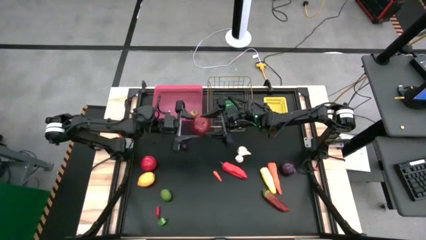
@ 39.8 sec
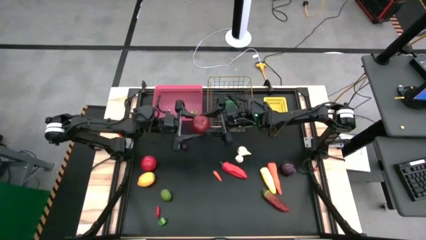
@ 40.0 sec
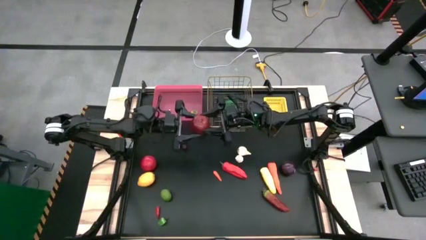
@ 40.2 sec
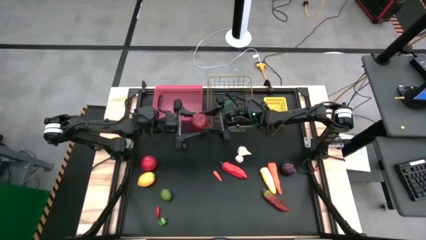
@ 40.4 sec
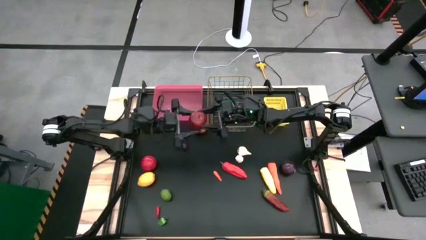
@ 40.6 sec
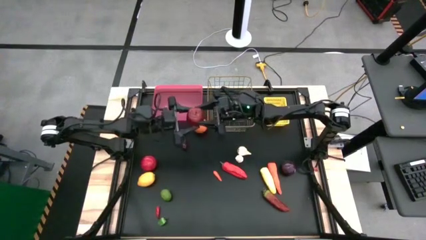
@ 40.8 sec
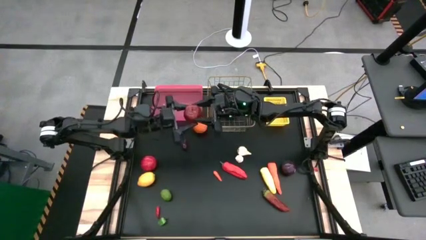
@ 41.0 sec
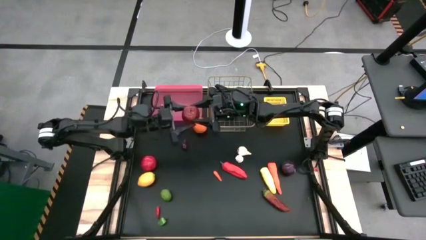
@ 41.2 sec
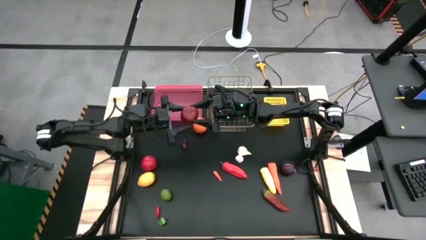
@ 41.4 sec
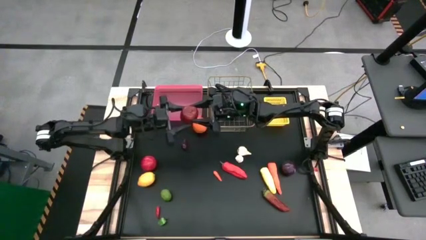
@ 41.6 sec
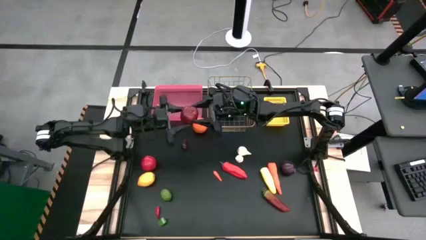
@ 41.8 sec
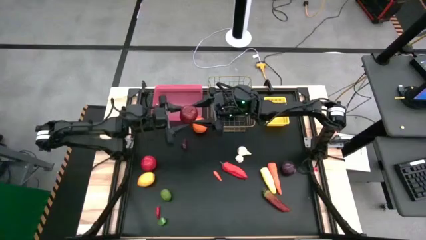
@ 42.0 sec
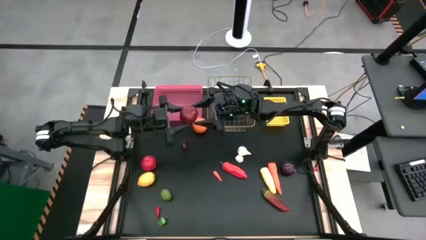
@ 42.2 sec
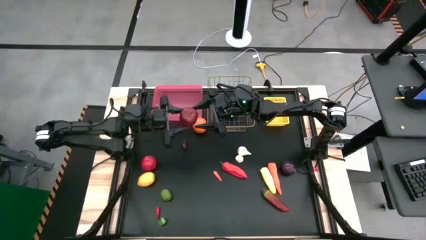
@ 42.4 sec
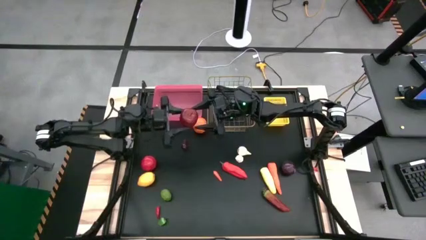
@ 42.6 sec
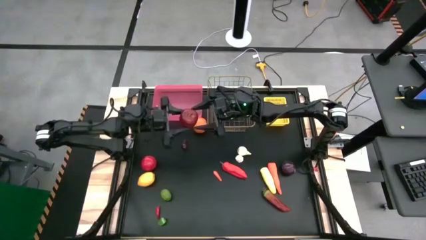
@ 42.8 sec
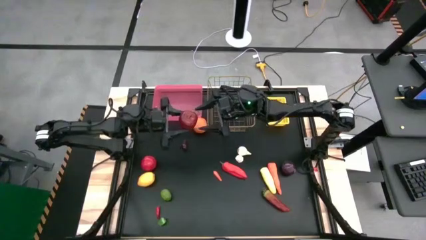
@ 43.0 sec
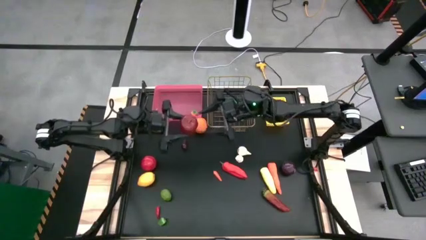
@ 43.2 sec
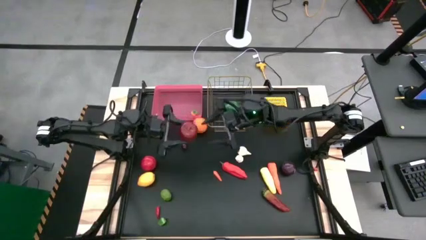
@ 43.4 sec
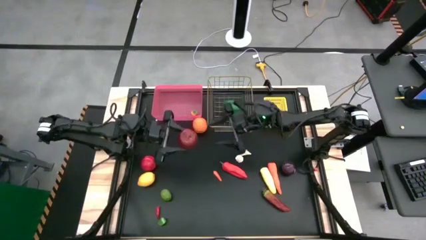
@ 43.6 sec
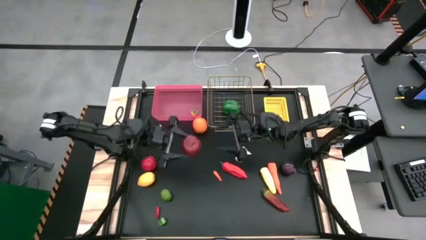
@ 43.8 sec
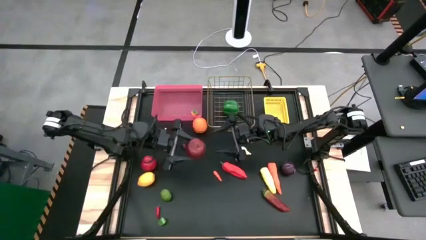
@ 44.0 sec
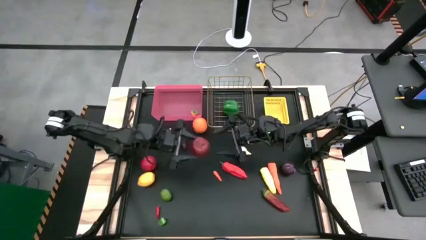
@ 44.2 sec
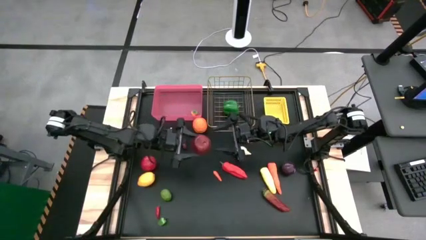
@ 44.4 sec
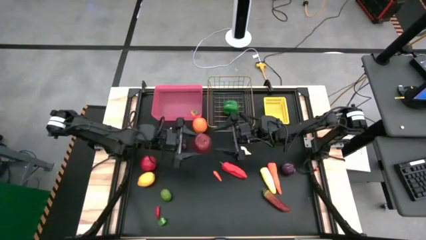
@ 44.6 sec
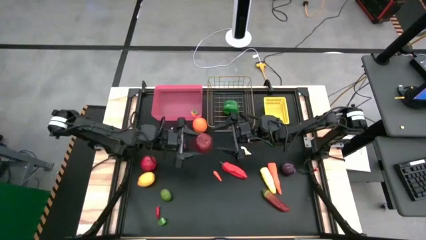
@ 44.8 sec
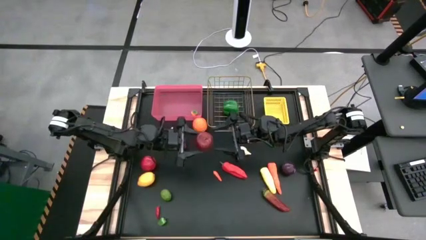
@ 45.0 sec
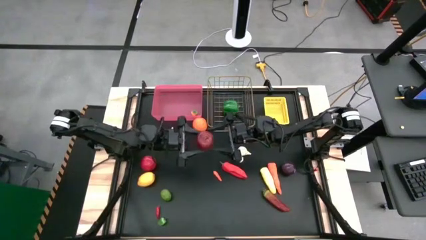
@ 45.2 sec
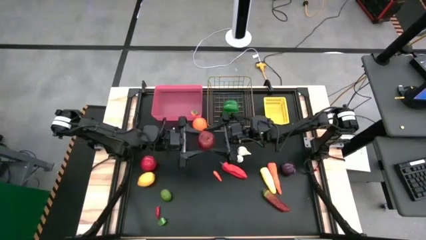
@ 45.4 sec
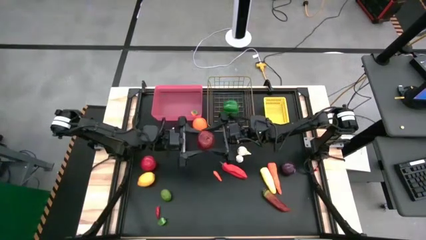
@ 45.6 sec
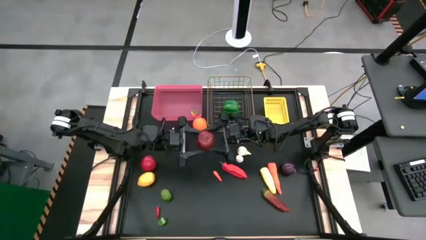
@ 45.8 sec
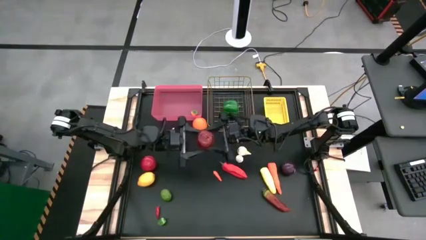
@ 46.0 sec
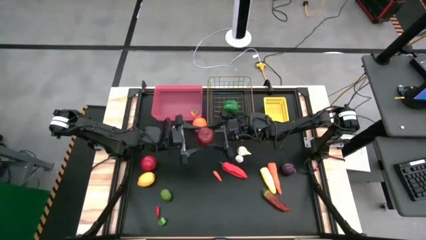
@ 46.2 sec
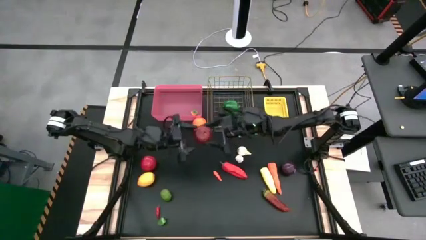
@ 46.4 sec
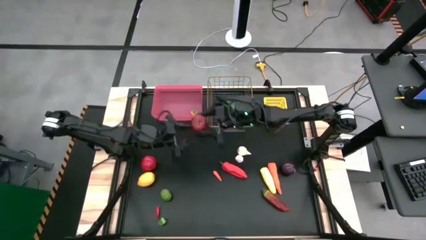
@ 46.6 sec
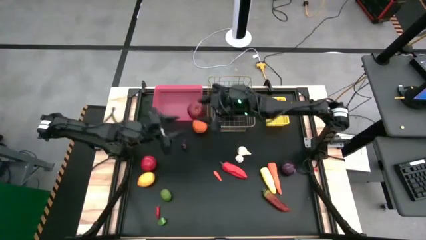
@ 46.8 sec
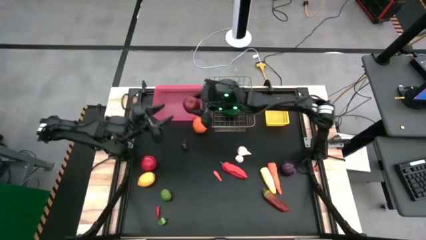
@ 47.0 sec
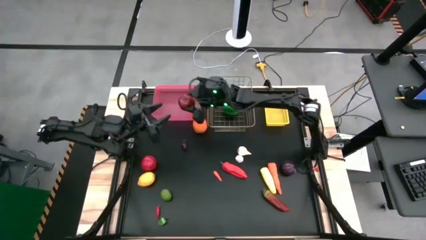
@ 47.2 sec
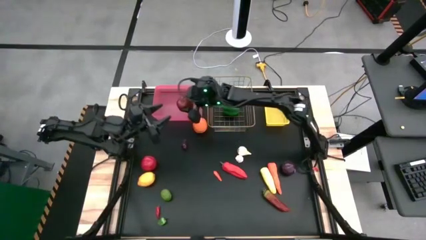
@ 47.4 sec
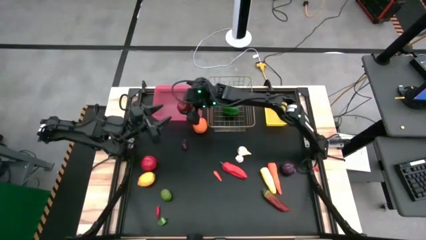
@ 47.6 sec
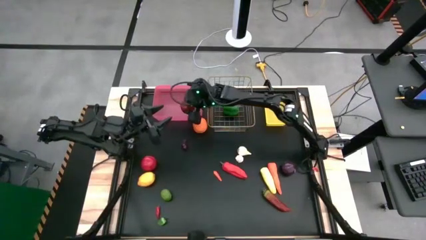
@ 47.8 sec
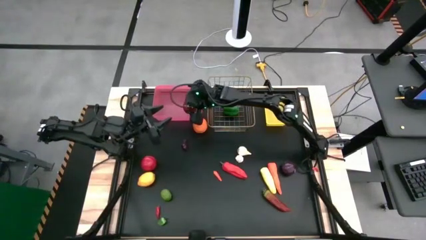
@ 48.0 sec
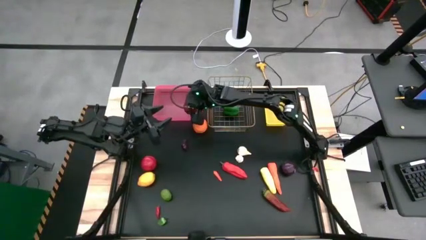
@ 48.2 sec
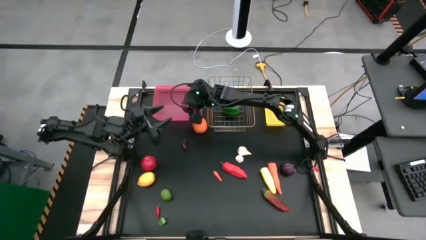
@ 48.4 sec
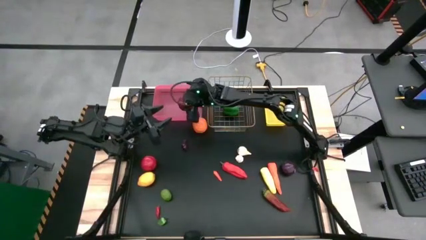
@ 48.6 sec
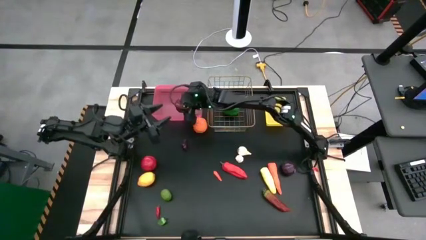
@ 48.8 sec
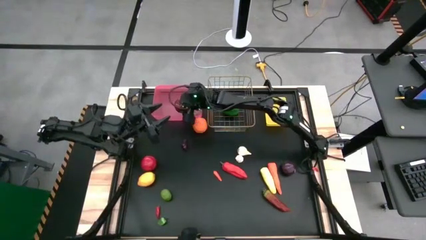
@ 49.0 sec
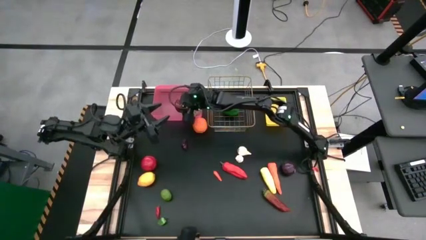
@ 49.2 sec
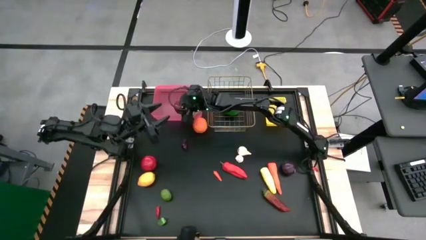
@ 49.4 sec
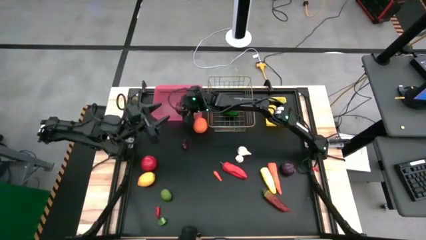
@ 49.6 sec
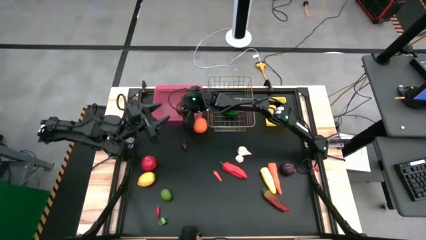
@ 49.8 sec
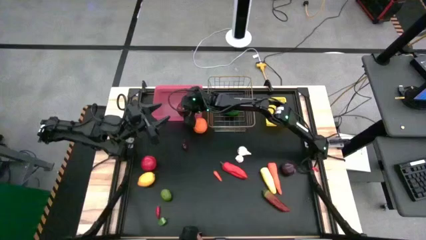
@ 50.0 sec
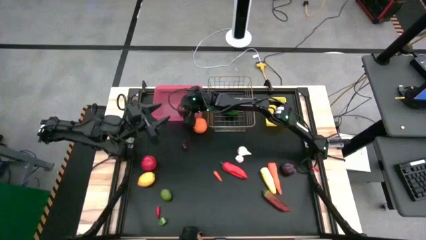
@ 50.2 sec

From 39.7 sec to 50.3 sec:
Task: Sort produce into baskets
Put the red apple into the red bin

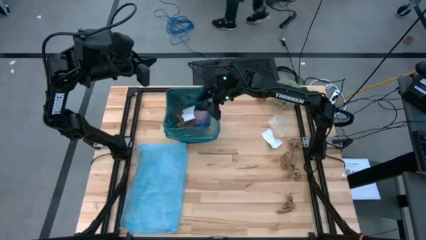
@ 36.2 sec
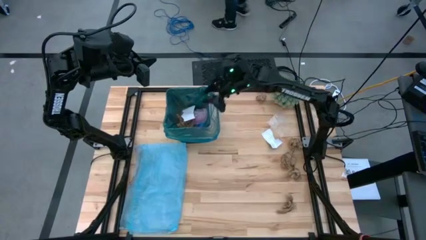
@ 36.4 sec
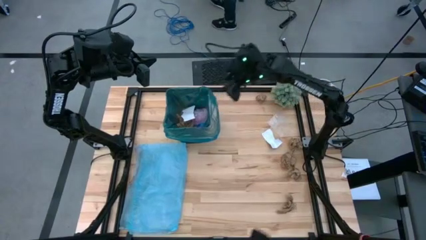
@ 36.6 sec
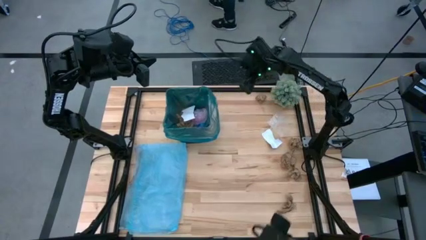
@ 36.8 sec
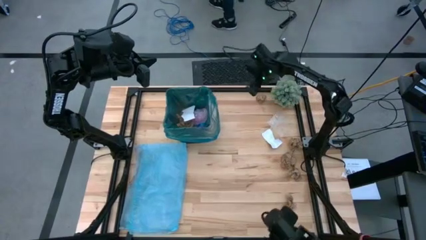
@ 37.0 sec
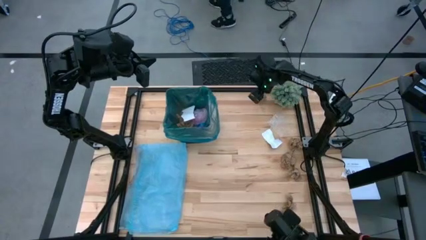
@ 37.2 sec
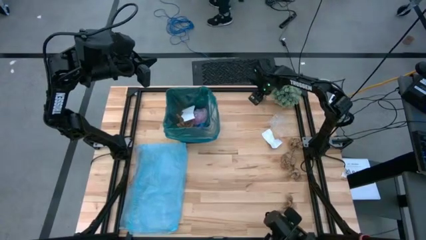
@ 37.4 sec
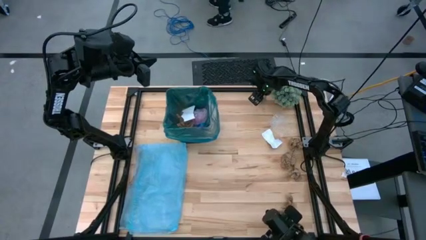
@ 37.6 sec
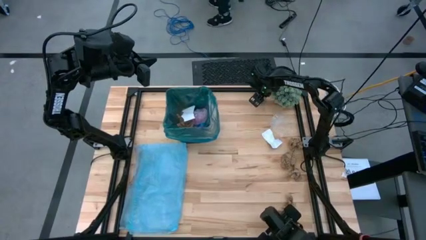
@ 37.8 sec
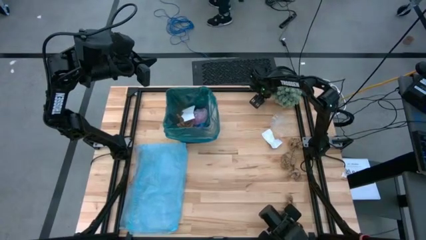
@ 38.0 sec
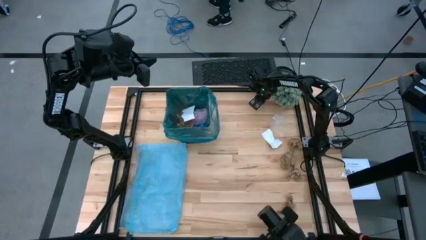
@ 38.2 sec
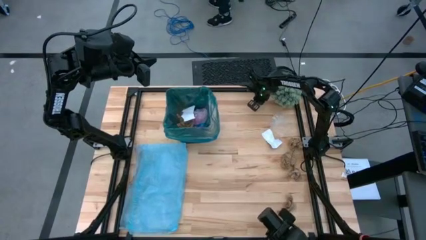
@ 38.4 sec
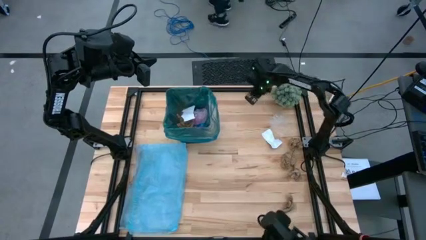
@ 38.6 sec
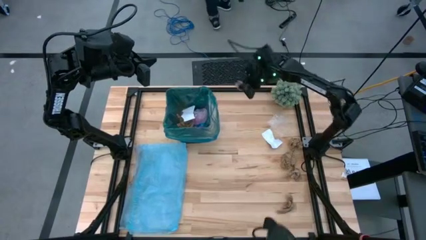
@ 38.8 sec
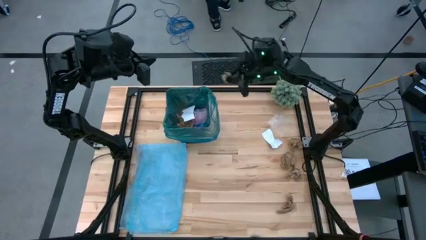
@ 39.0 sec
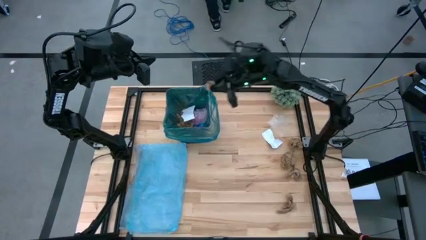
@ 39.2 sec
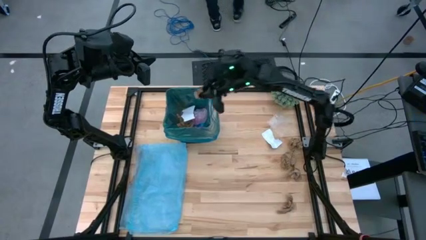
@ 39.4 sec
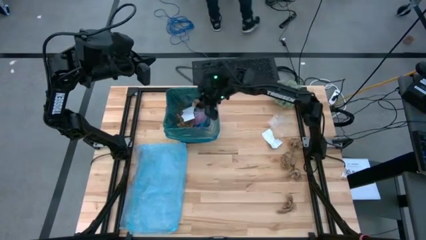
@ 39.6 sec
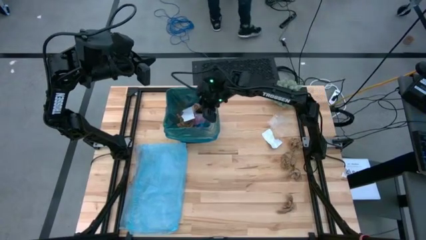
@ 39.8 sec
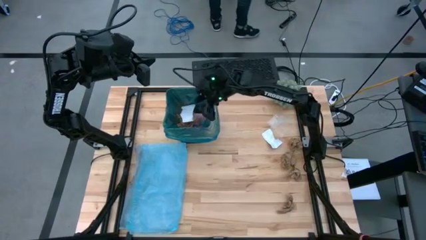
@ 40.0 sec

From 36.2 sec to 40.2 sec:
Task: place trash/remove bag and relplace
Put the brown napkin into the trash bin

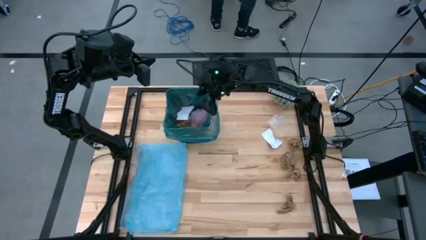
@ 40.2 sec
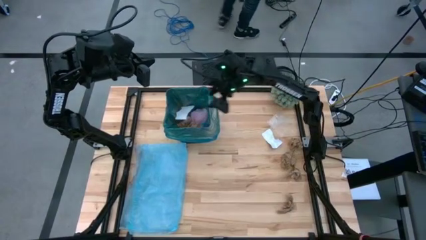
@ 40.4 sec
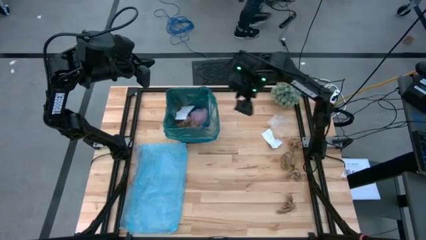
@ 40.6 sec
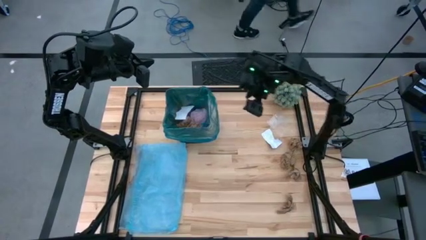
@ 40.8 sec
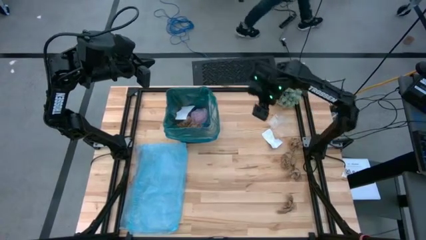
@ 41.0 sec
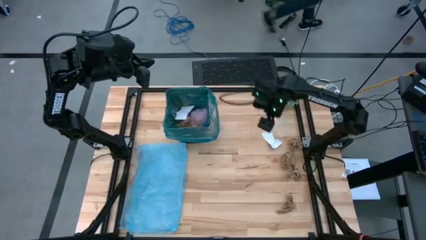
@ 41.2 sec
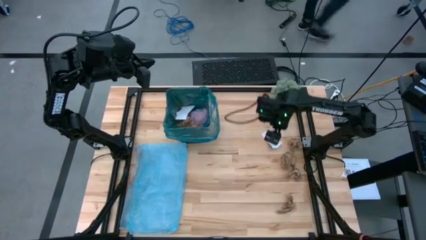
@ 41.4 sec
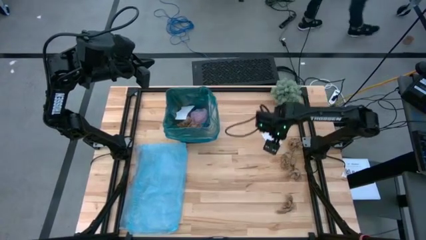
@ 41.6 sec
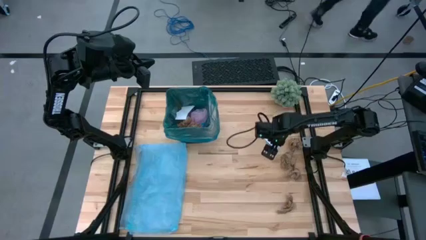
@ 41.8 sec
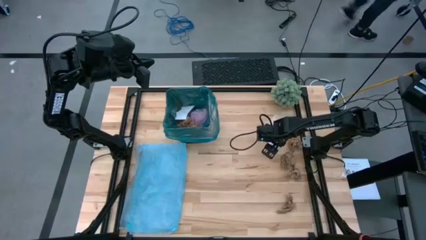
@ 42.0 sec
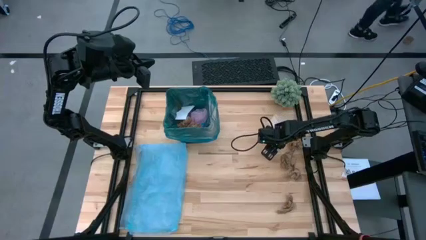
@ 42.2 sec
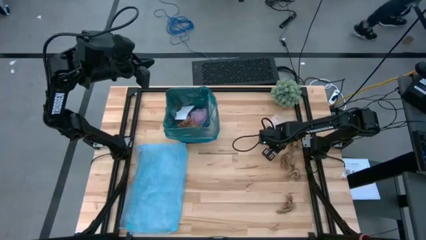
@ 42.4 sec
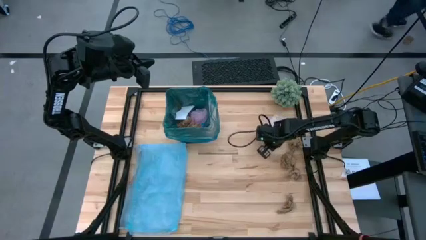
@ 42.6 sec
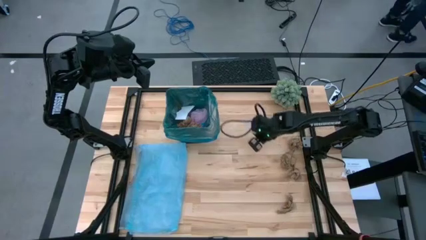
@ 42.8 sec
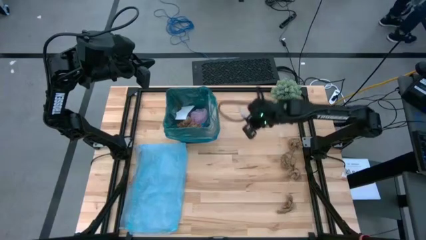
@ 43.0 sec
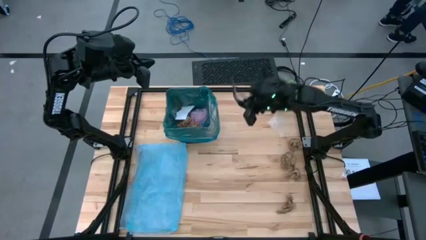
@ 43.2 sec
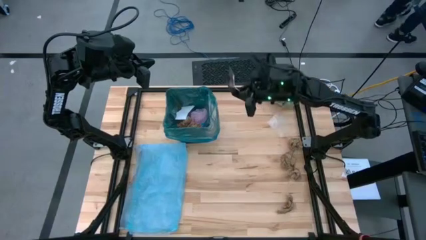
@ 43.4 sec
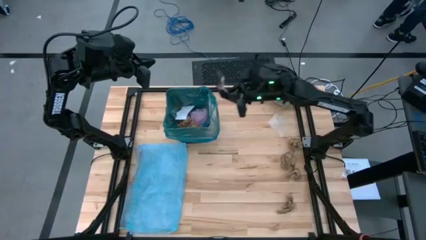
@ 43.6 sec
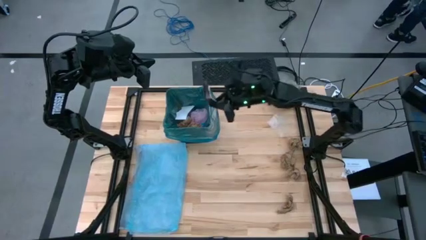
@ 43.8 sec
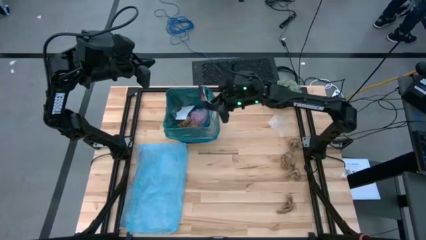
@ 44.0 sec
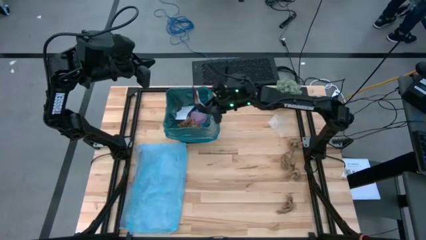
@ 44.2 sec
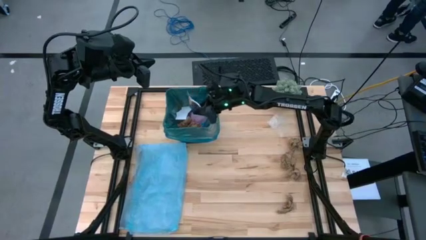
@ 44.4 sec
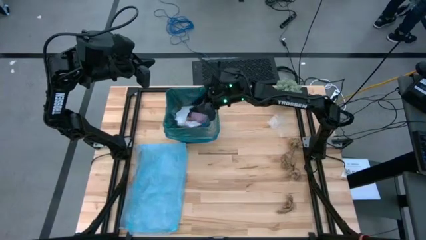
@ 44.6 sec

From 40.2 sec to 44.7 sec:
Put the white paper into the trash bin
